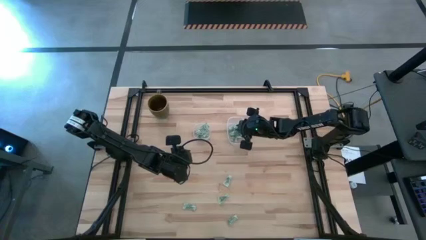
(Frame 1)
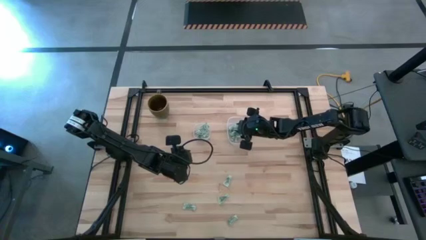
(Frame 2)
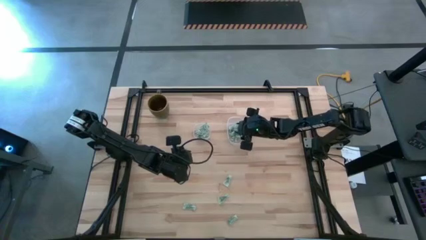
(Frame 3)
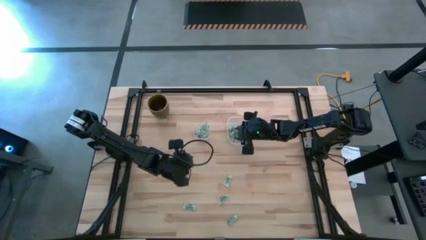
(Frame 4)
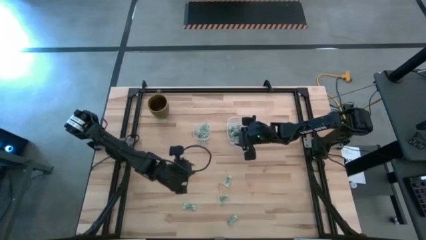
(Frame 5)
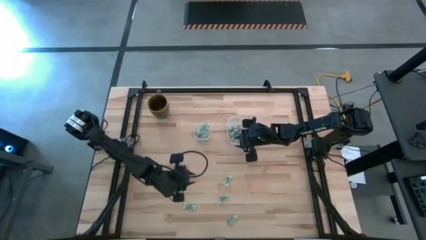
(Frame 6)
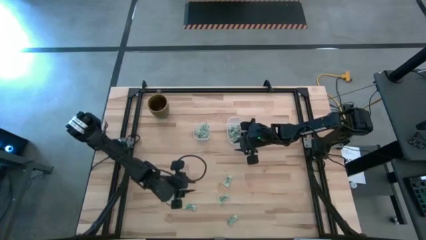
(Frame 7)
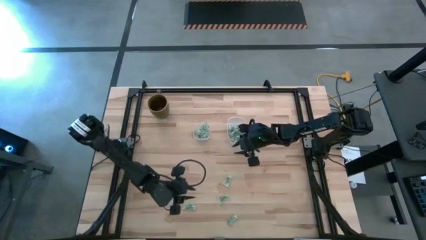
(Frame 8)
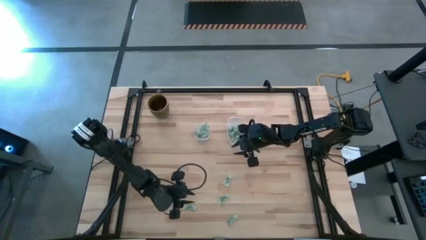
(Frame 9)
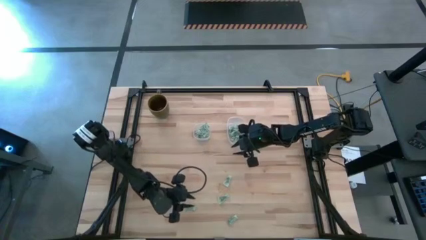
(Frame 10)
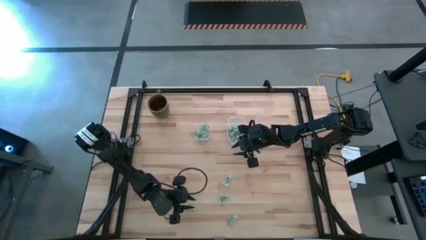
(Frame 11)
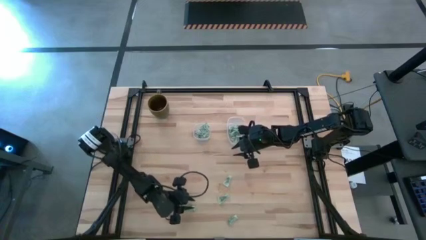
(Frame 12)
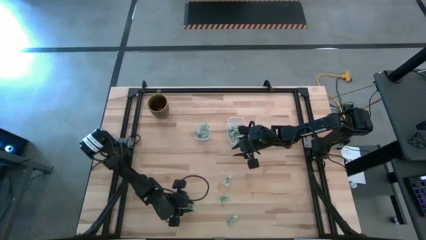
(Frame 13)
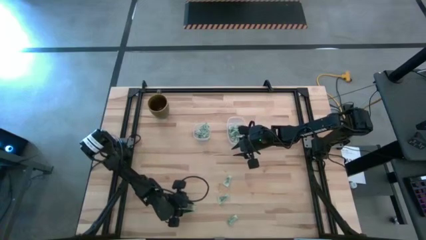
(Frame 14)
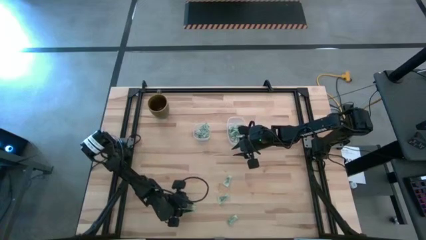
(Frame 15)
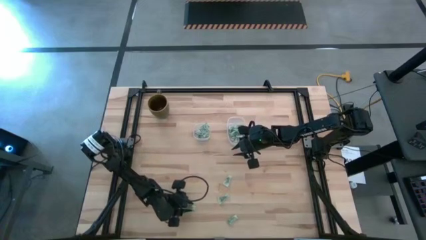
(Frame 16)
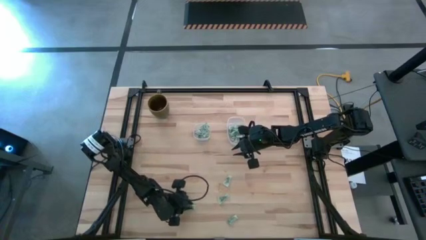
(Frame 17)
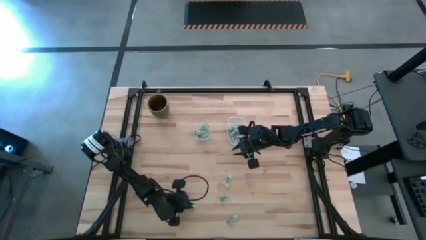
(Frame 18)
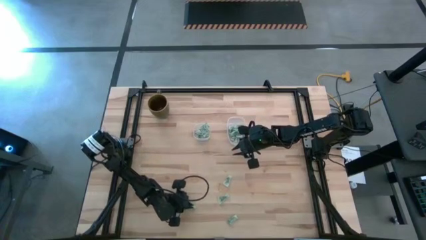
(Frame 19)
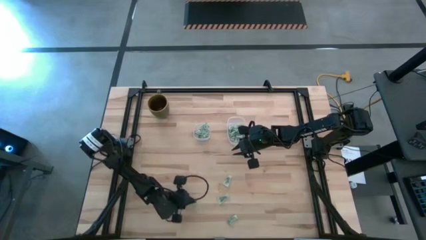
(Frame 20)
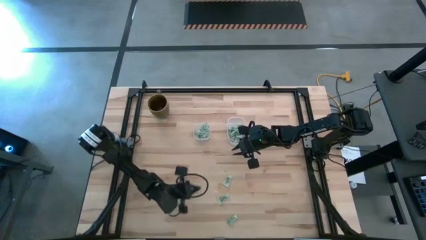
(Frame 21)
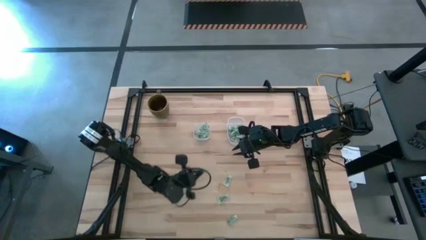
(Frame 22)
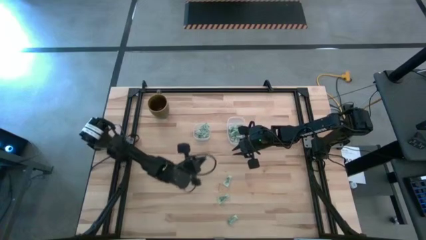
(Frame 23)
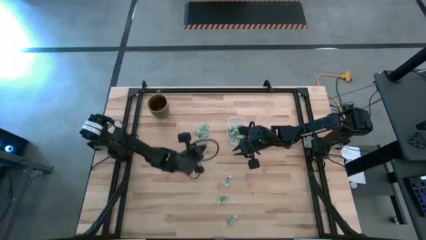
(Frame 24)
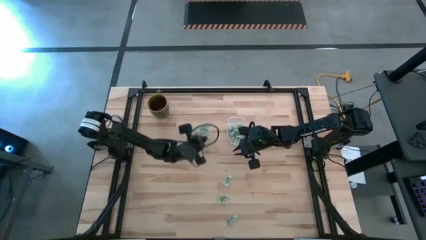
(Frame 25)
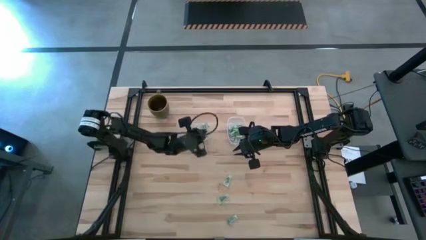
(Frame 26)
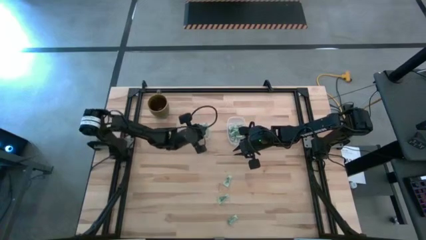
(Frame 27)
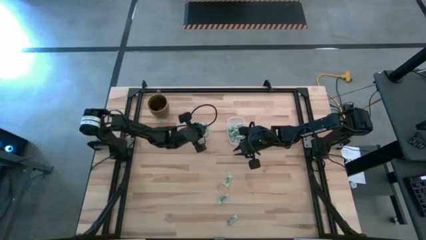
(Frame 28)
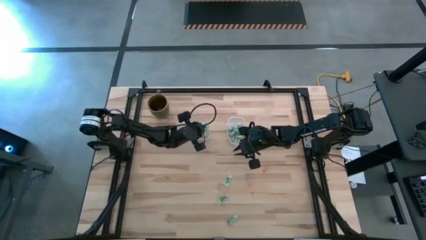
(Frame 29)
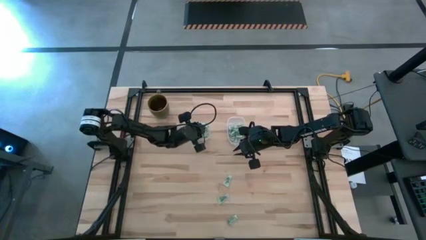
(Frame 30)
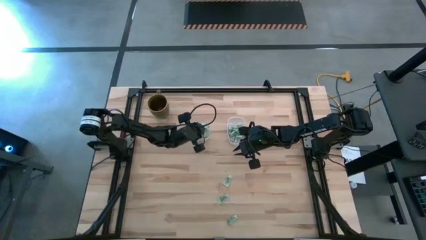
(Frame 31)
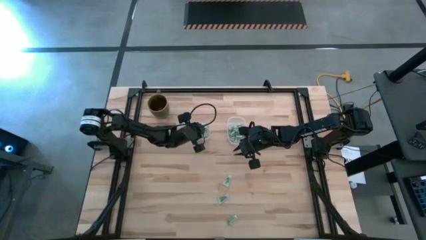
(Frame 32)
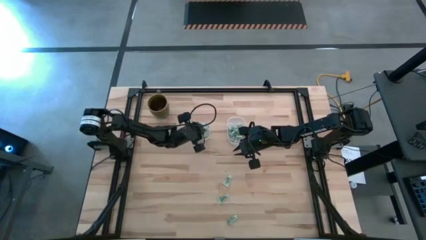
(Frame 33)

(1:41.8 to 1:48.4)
Task: Pick and place items into bin
Put the light green stevia packet into the left transparent bin

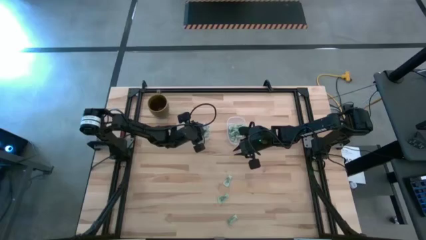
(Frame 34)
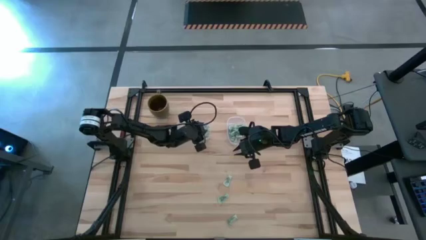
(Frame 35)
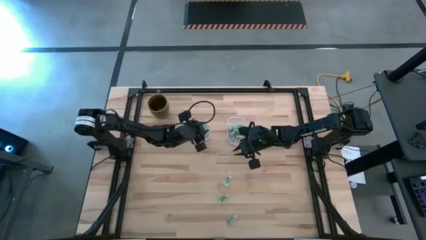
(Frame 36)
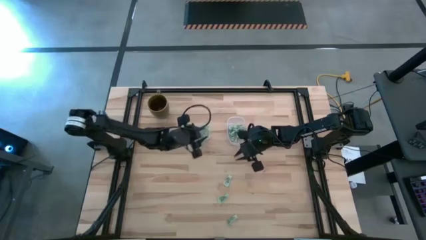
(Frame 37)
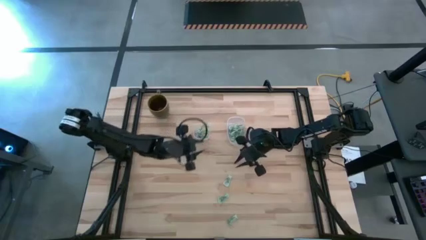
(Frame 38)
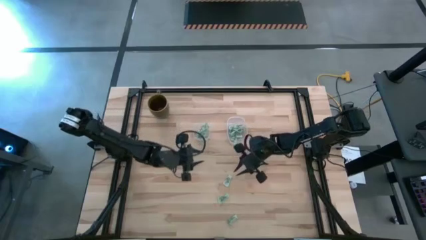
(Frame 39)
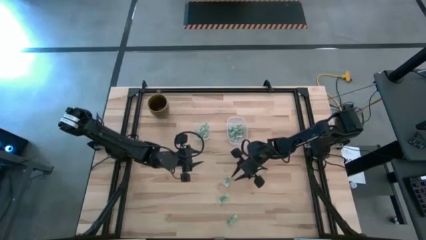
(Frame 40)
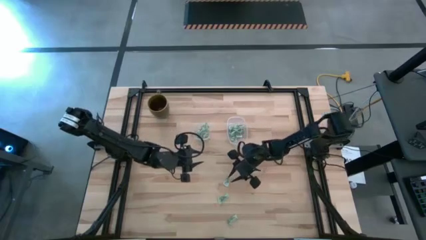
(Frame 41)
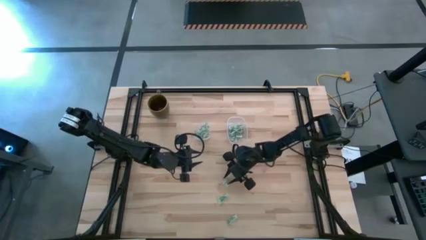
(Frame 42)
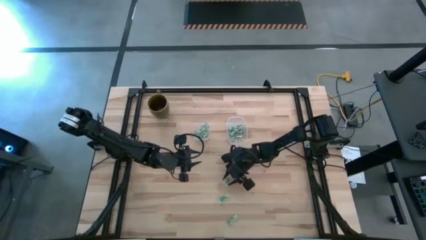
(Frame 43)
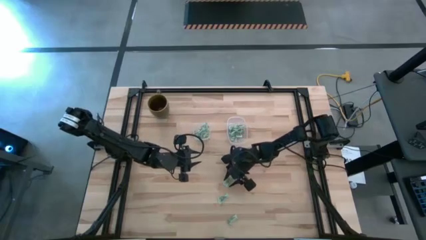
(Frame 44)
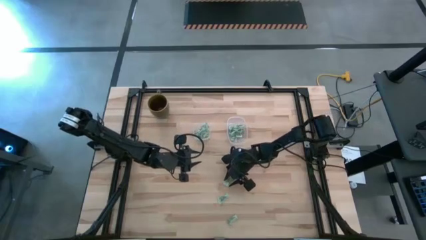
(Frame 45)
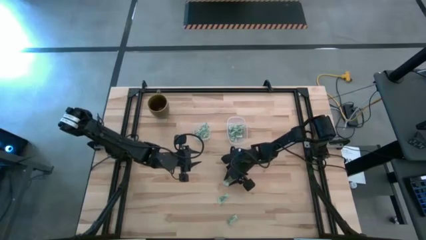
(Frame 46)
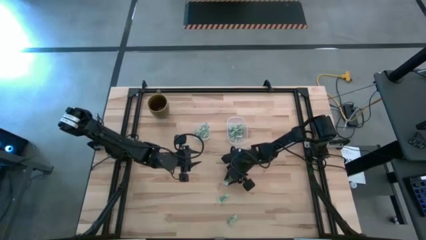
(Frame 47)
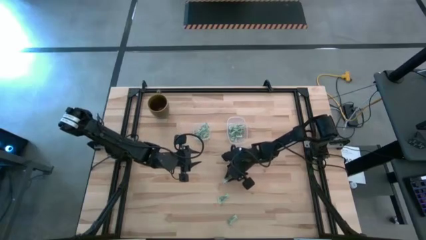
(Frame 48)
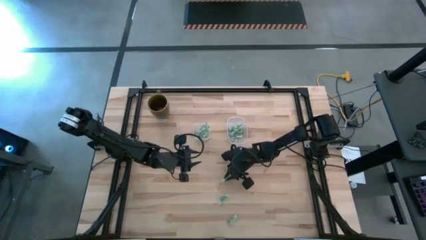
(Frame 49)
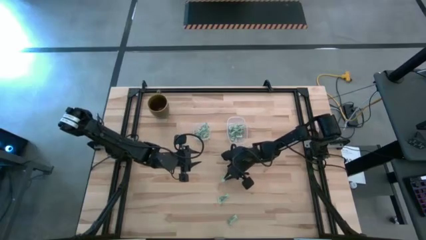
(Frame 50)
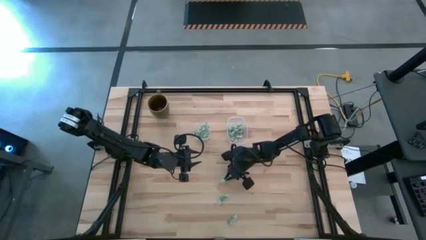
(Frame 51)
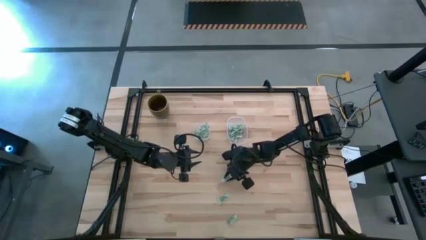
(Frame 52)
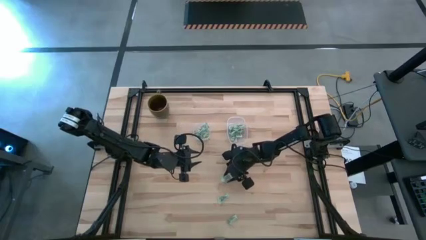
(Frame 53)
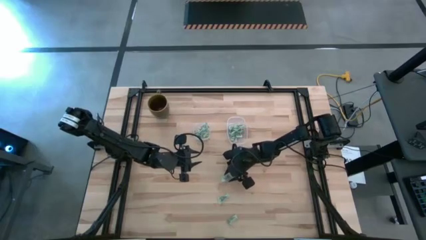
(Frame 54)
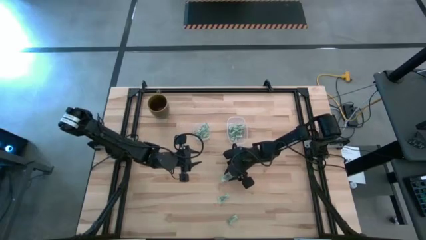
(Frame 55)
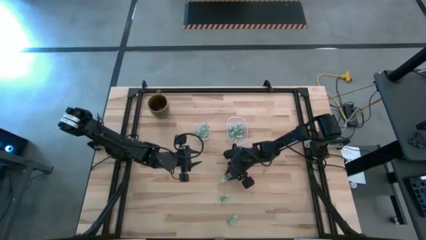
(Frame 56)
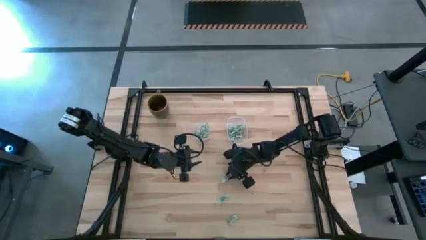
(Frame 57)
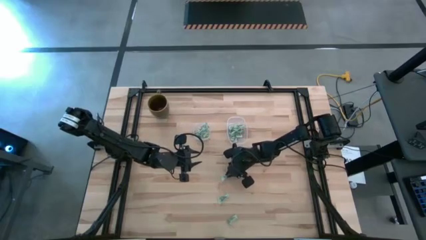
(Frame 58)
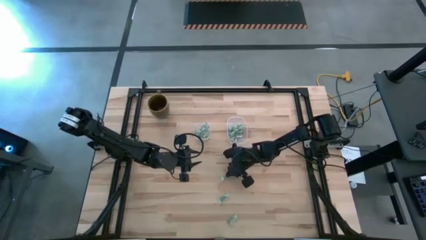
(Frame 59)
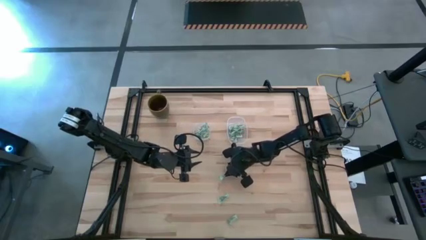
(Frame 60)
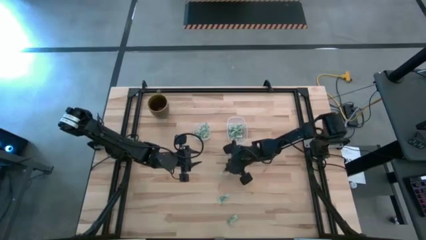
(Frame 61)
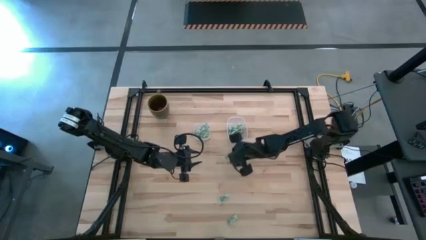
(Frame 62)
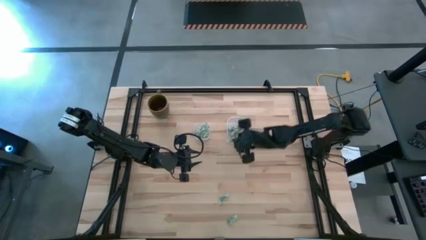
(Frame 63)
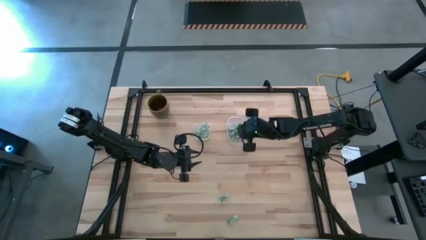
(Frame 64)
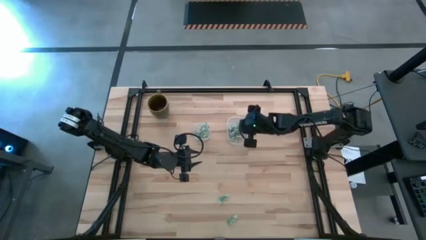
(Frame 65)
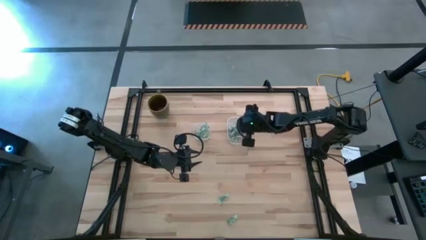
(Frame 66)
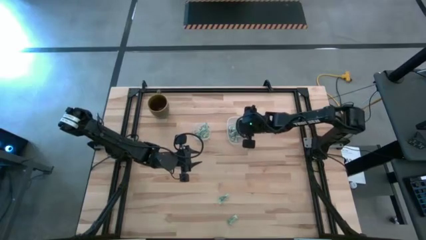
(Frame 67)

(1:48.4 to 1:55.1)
Put the light green stevia packet into the right transparent bin

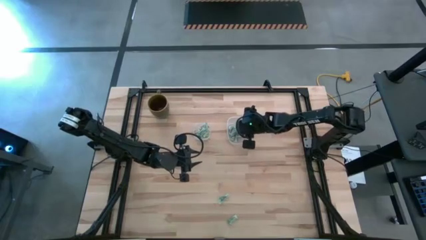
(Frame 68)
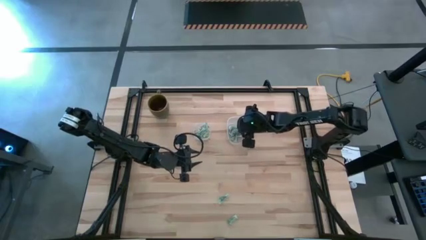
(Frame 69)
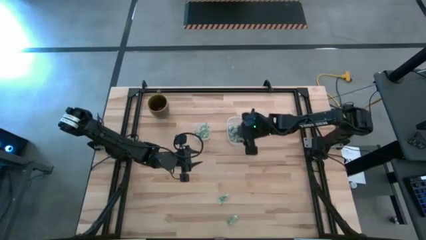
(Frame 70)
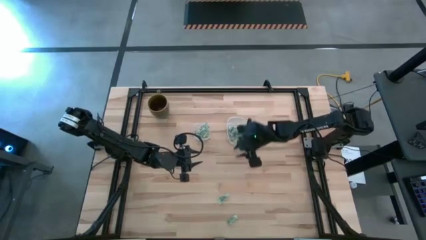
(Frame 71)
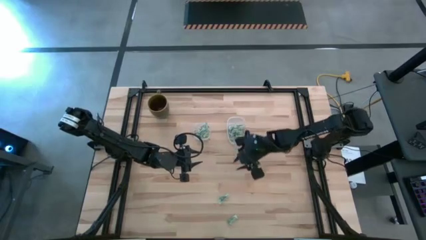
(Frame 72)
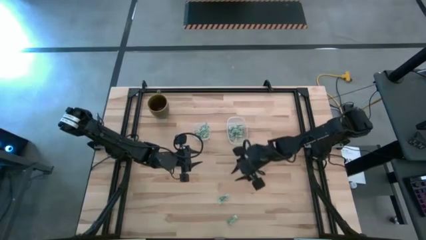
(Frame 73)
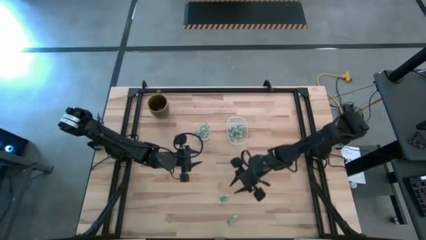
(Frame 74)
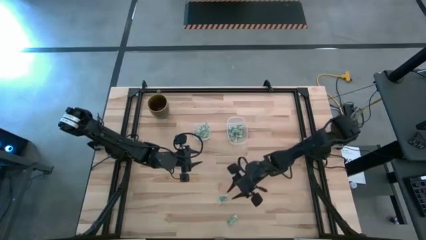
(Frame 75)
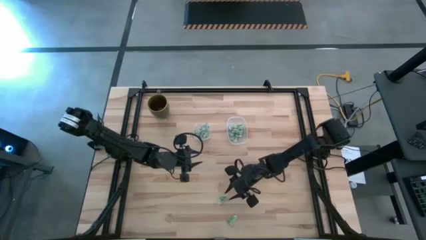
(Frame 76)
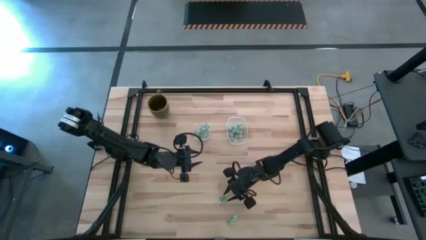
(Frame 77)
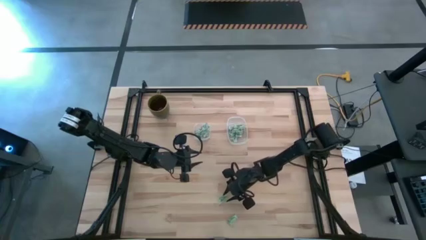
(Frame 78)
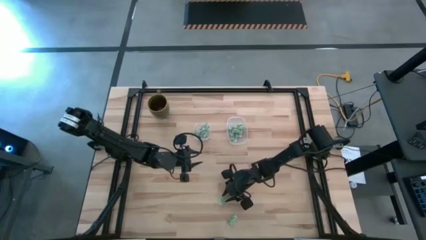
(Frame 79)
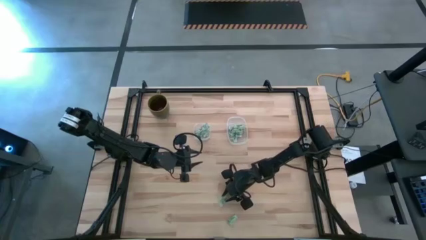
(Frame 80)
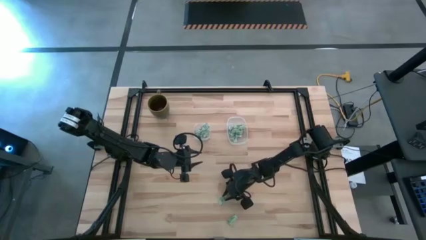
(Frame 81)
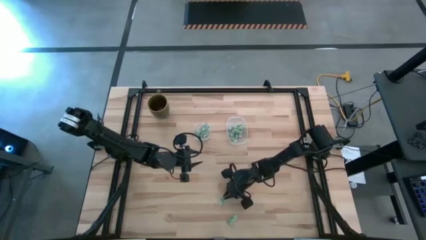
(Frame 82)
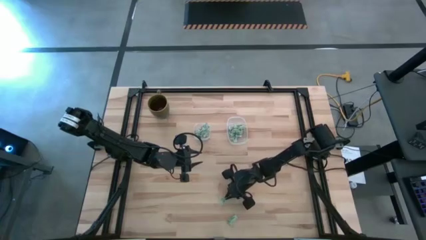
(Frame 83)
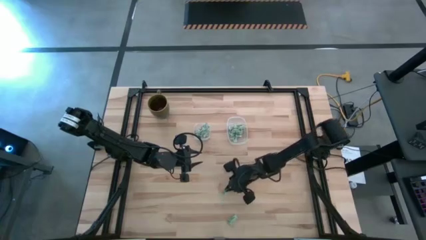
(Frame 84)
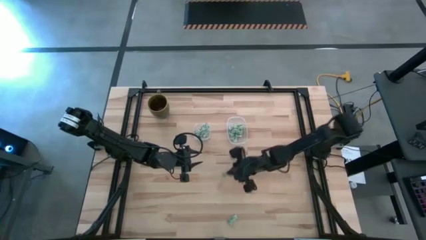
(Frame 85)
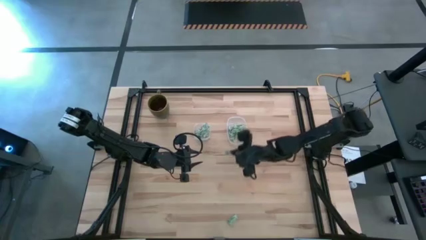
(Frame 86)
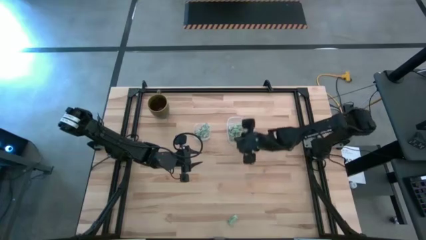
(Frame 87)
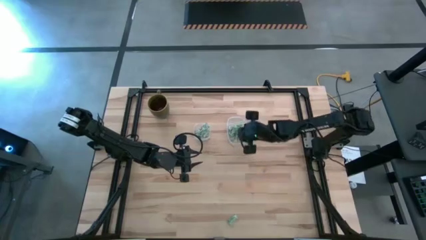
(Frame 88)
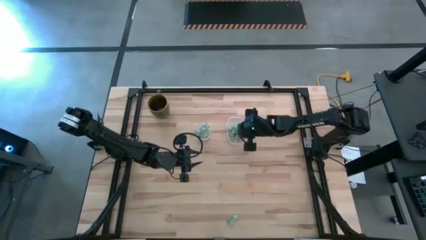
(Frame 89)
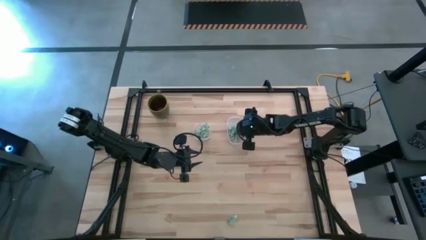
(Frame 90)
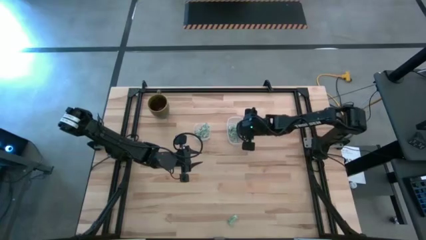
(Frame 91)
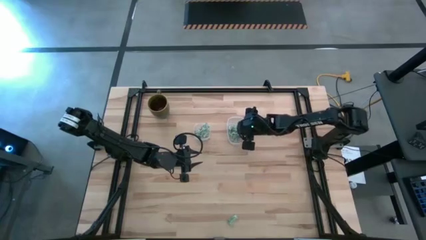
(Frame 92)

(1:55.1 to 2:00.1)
Put the light green stevia packet into the right transparent bin
